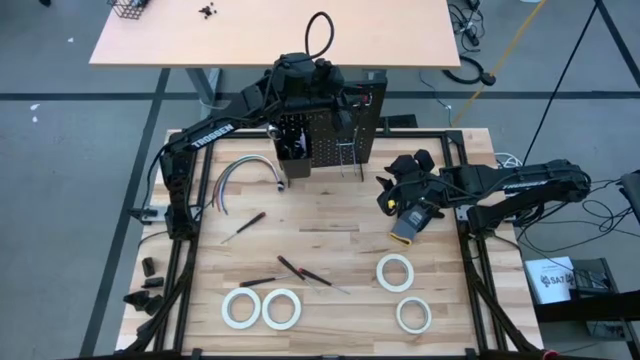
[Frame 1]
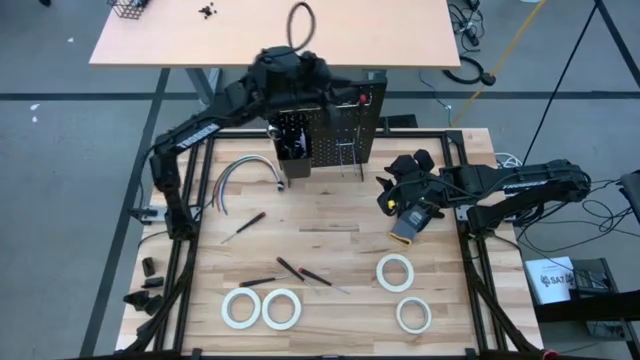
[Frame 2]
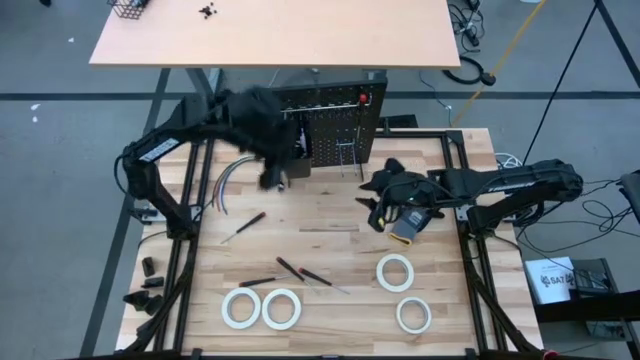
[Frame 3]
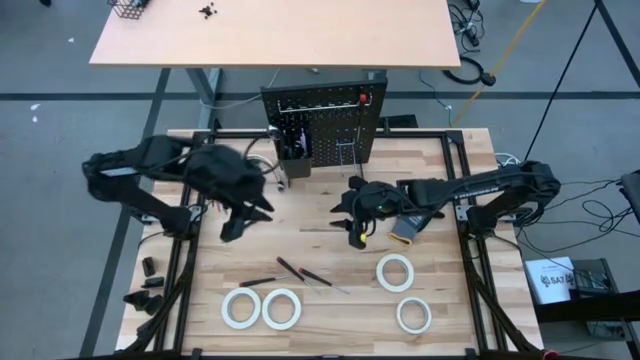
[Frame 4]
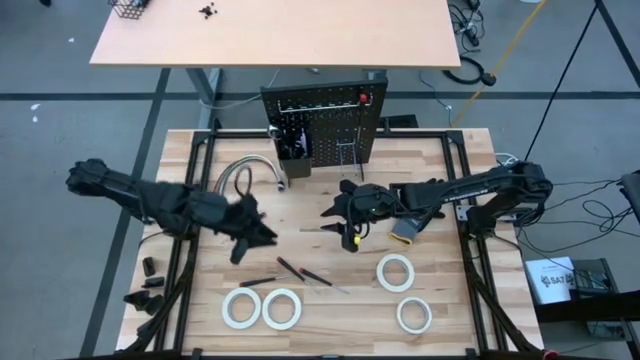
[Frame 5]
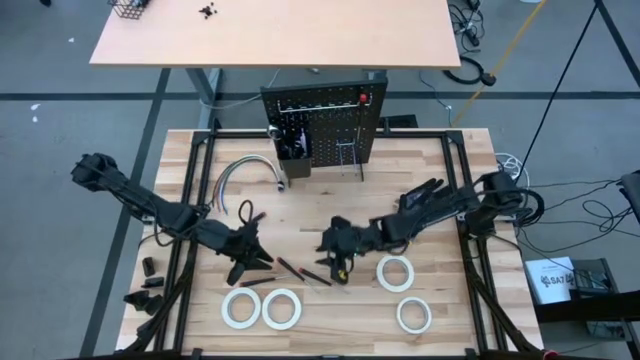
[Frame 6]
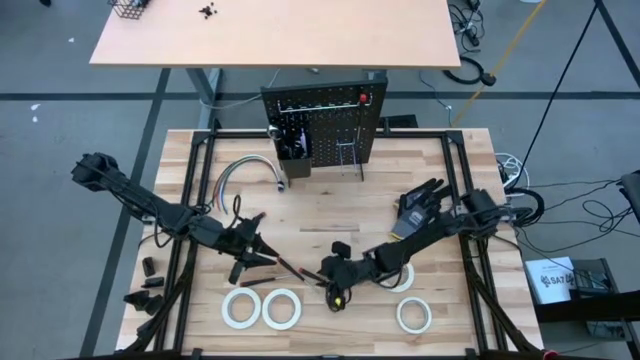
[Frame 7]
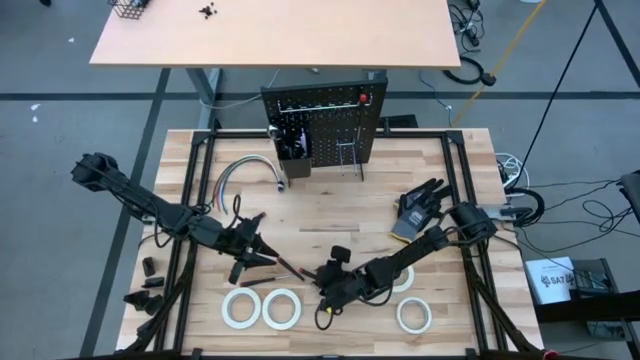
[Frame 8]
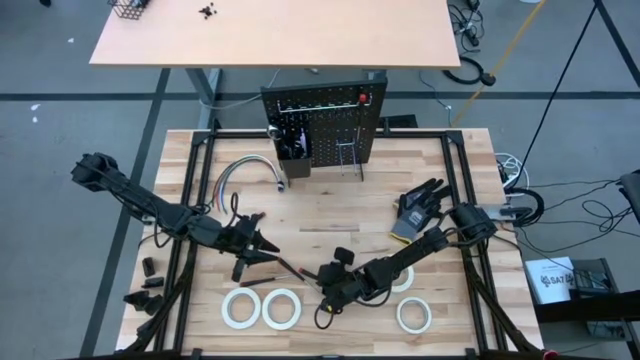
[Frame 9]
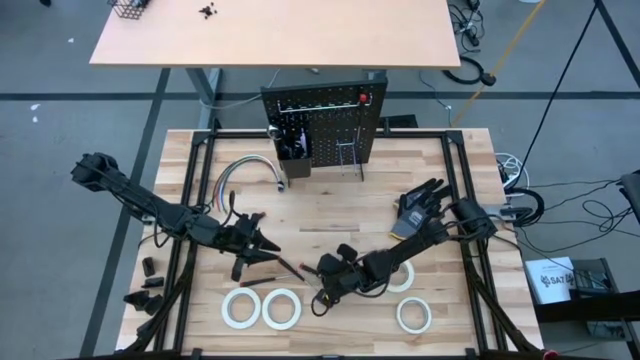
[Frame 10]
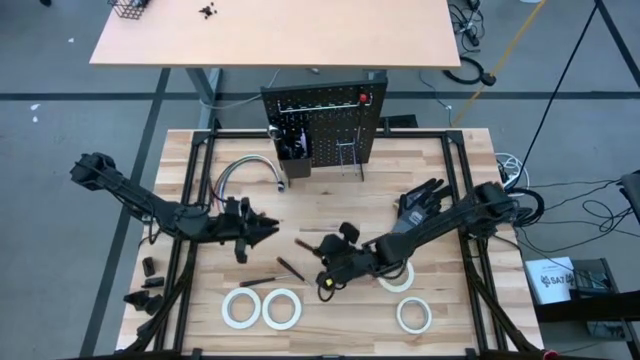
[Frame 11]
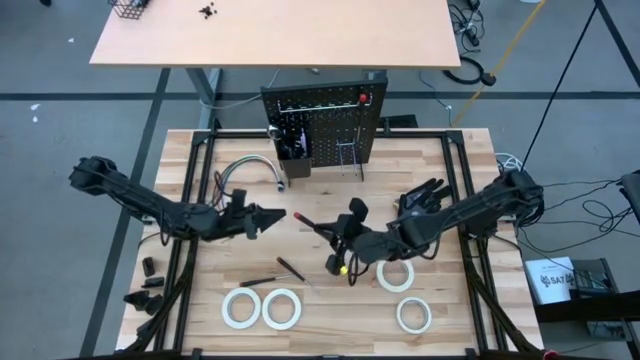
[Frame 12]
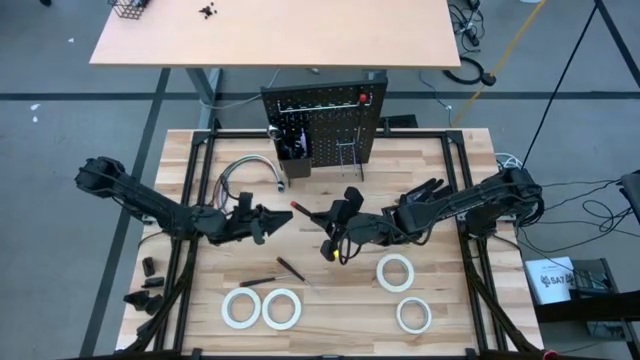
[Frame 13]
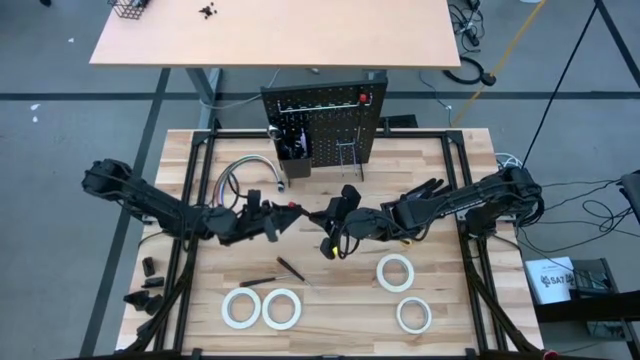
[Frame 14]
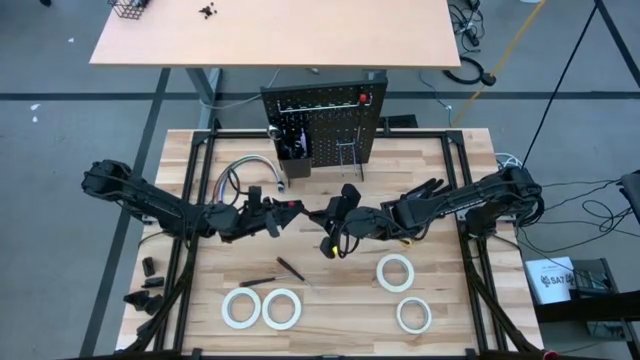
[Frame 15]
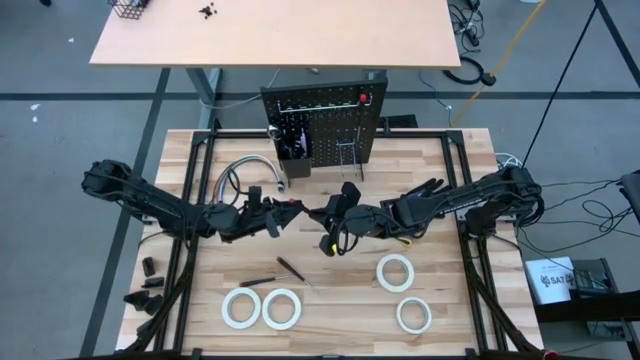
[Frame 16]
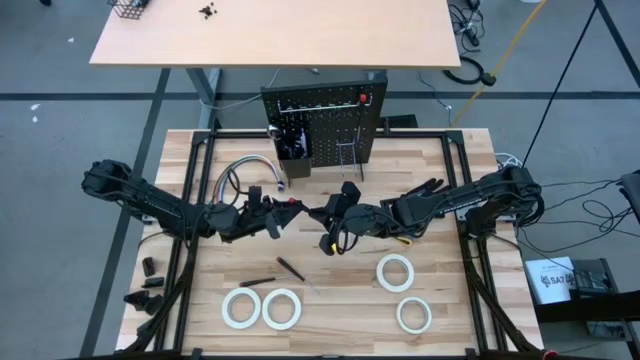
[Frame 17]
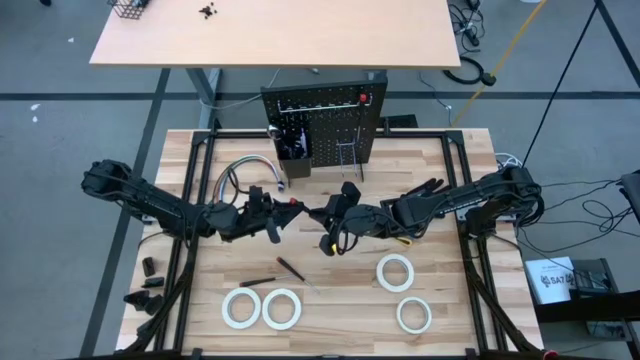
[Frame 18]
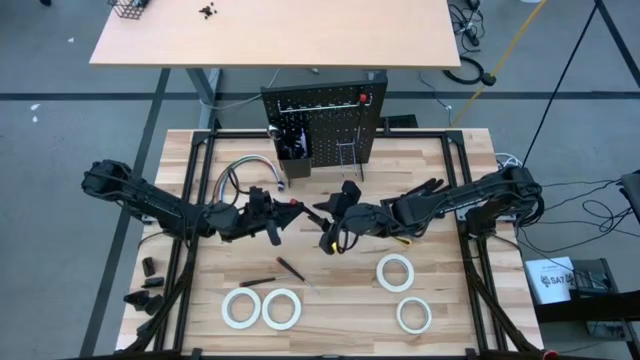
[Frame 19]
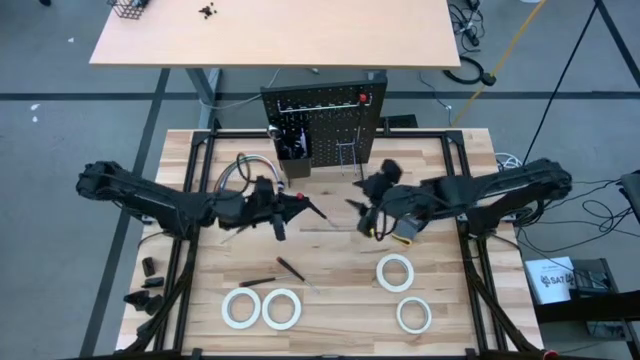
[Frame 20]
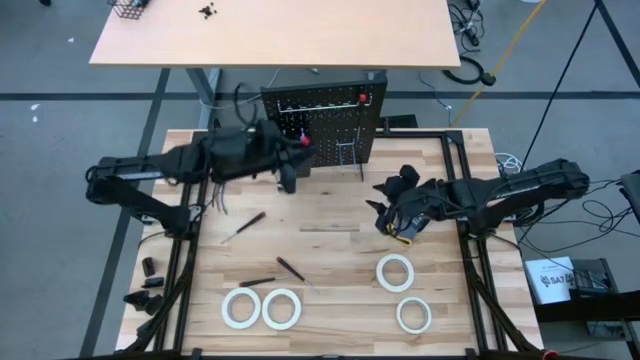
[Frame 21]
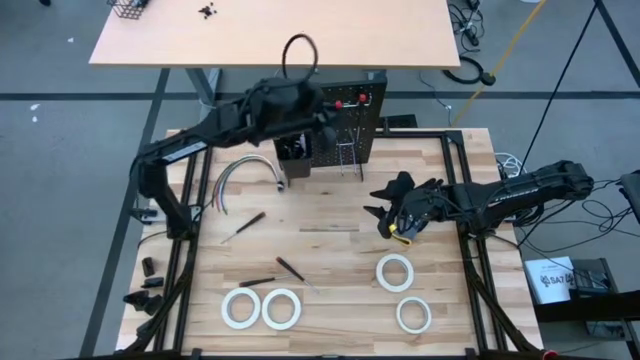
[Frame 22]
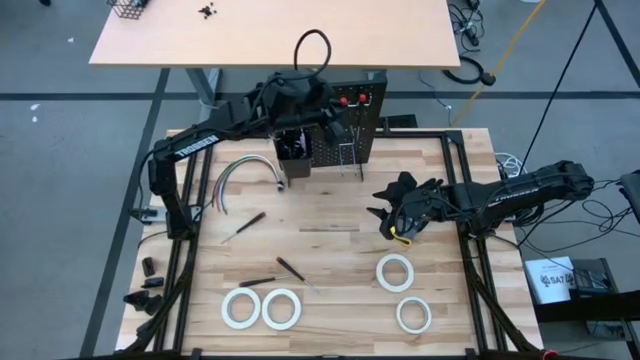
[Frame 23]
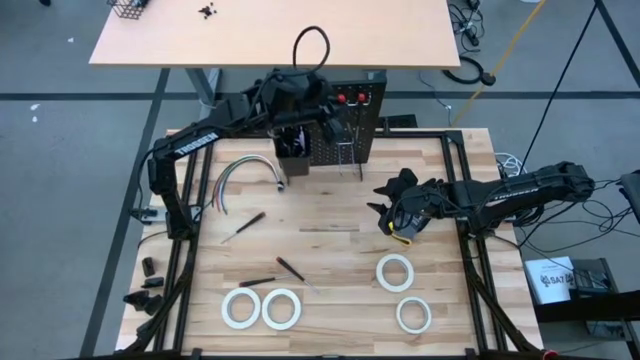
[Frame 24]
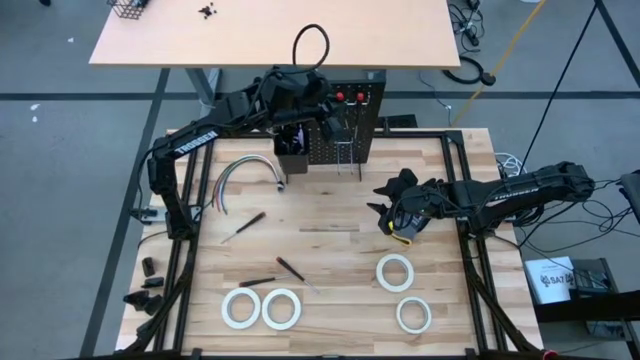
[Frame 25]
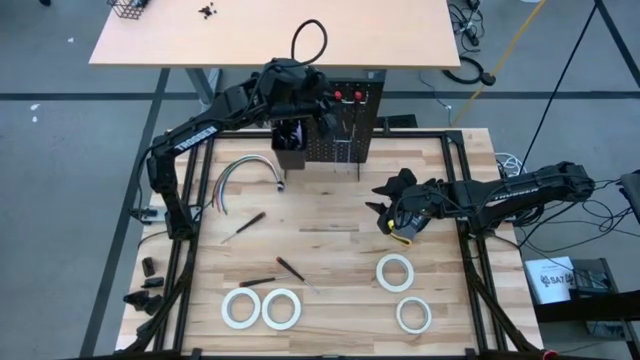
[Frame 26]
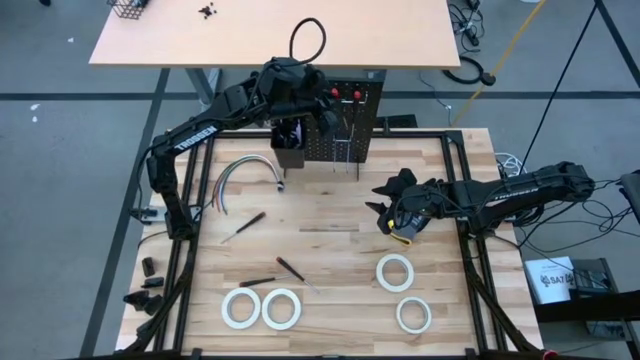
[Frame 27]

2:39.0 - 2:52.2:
Task: Hang tools onto peg board
Hang the nut driver on the peg board

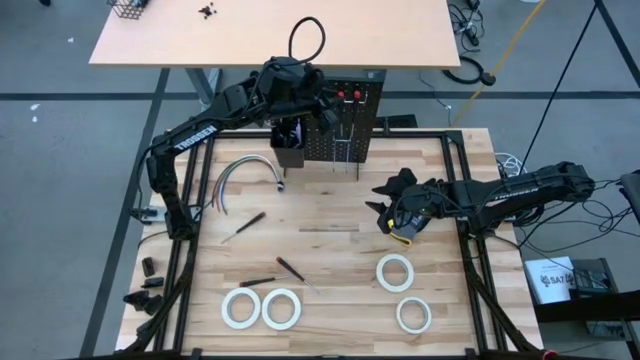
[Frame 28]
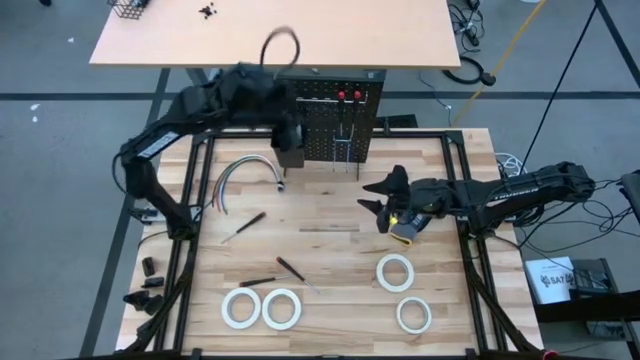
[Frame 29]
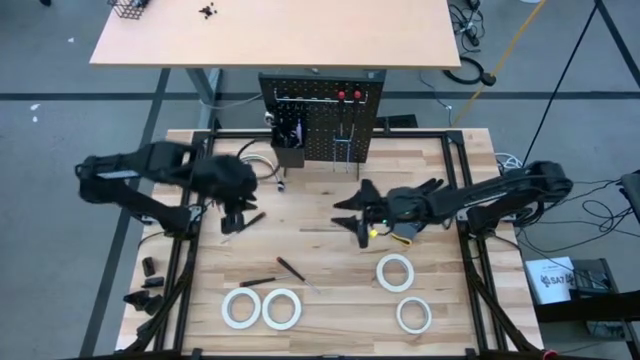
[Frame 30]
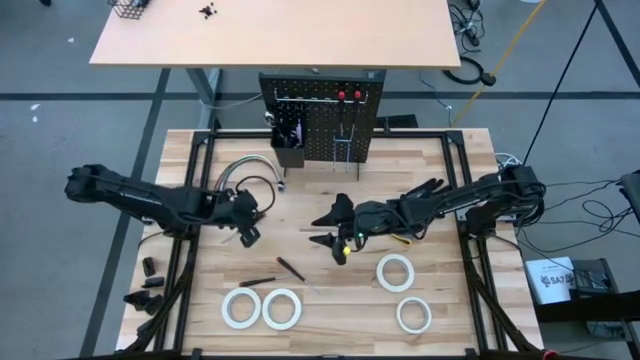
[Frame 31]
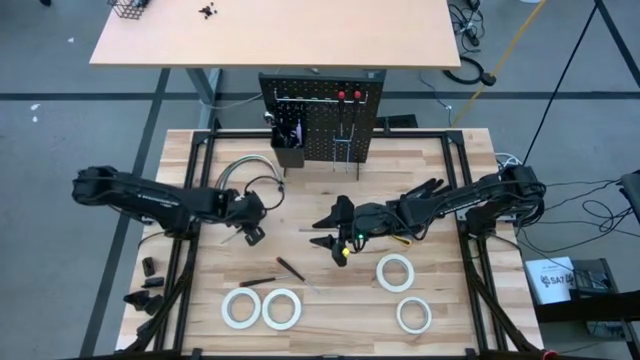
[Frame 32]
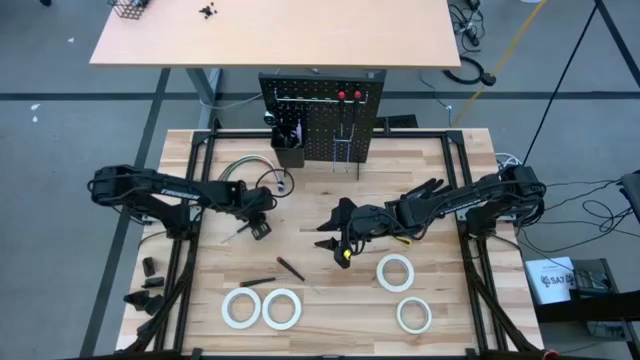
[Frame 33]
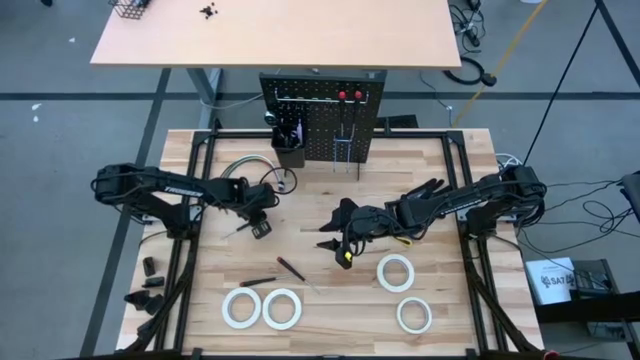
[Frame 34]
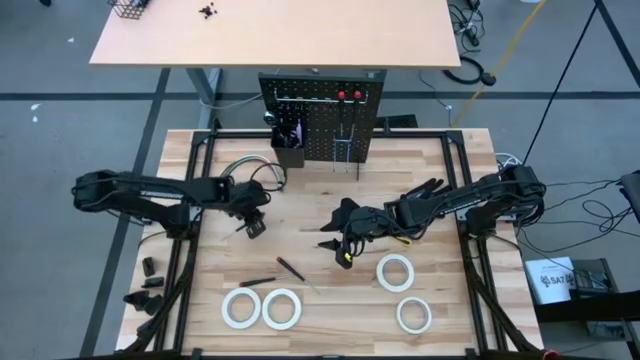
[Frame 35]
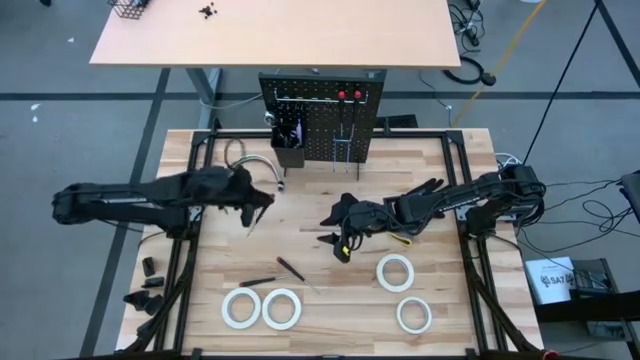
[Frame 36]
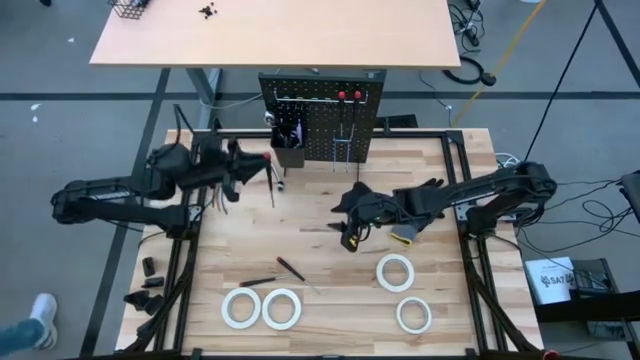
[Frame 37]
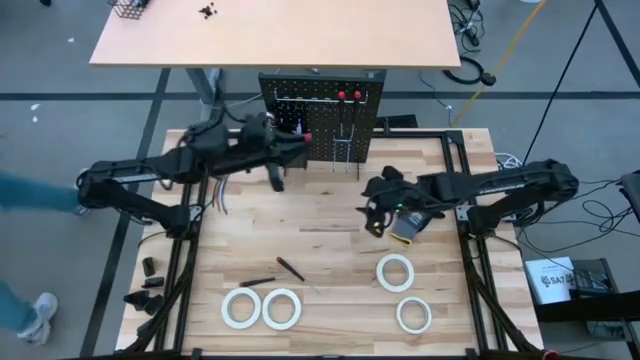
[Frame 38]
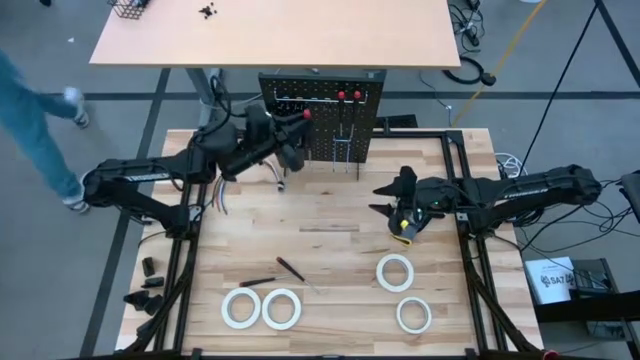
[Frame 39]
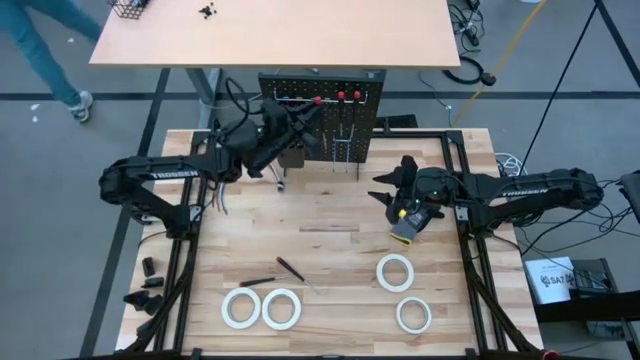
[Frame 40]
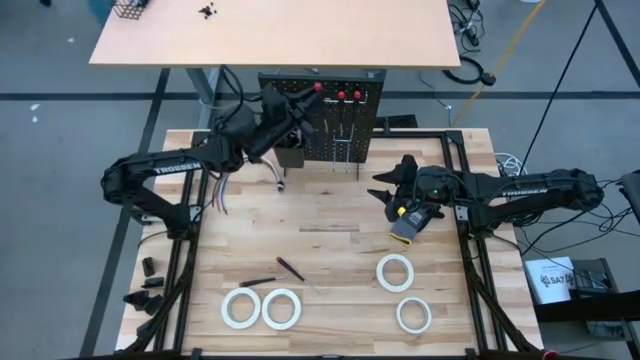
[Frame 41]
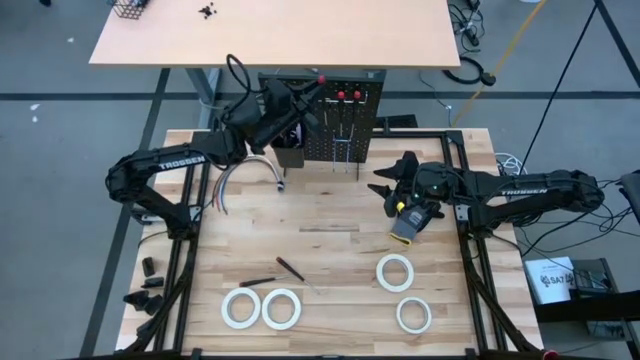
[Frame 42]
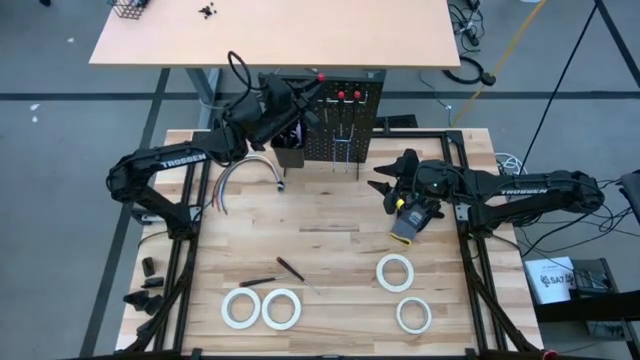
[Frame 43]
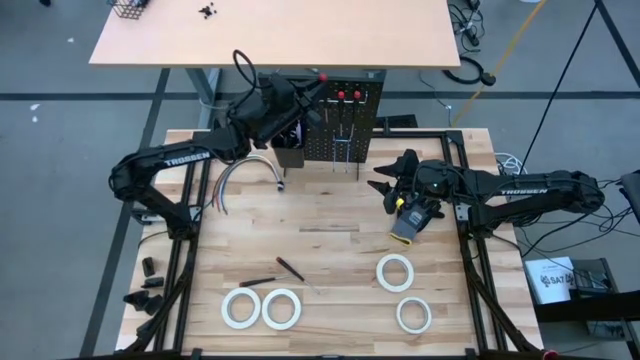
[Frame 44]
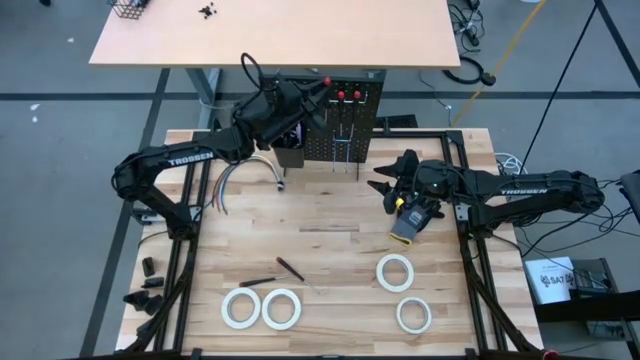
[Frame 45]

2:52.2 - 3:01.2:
Hang the nut driver on the peg board
